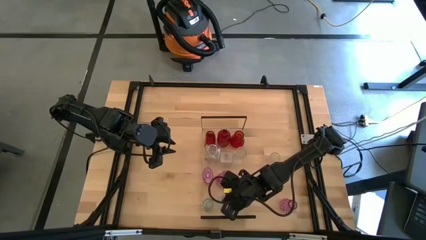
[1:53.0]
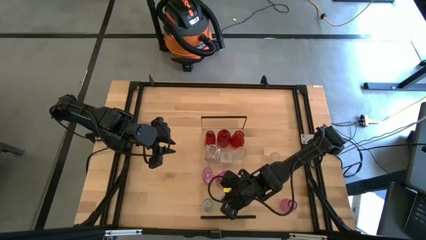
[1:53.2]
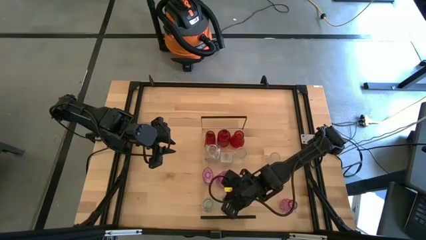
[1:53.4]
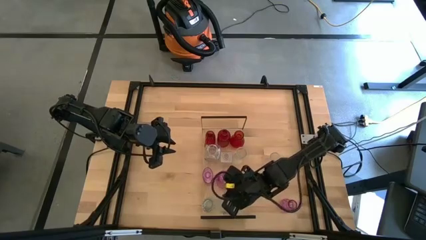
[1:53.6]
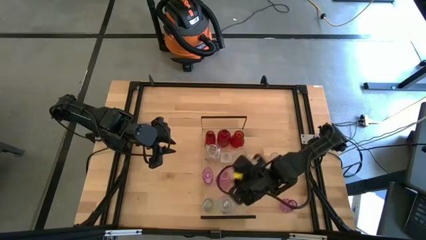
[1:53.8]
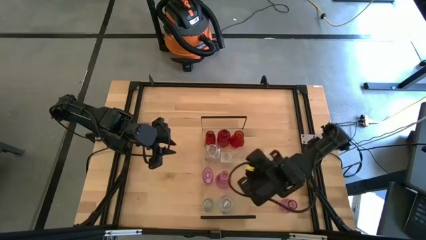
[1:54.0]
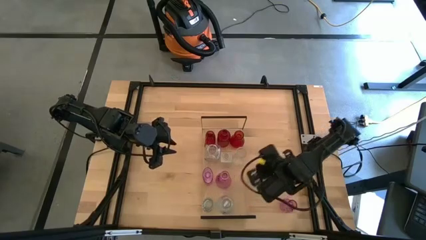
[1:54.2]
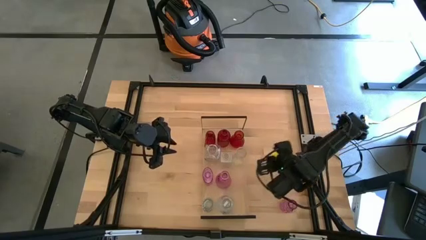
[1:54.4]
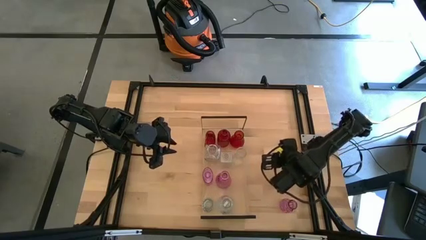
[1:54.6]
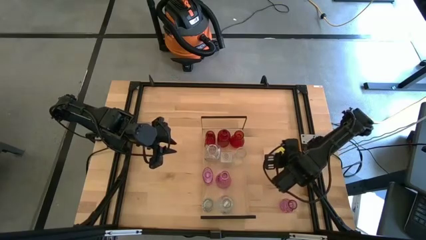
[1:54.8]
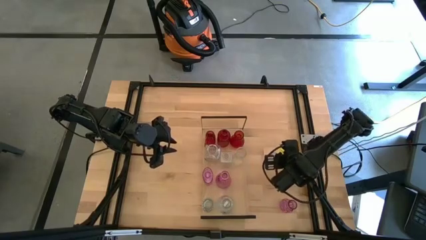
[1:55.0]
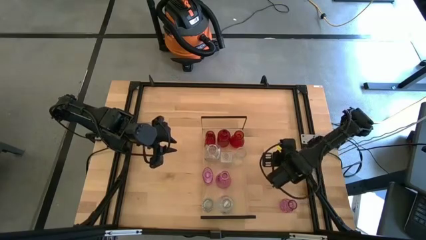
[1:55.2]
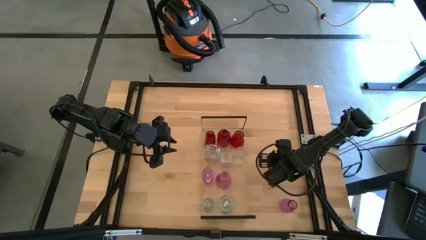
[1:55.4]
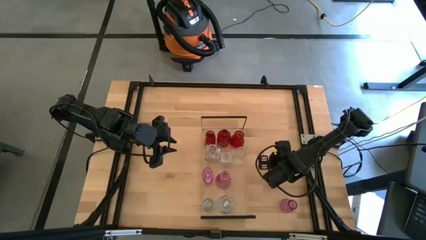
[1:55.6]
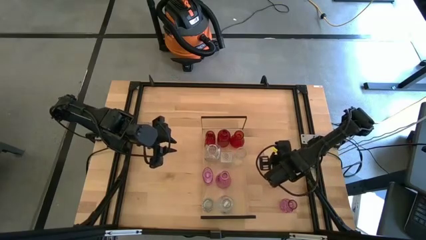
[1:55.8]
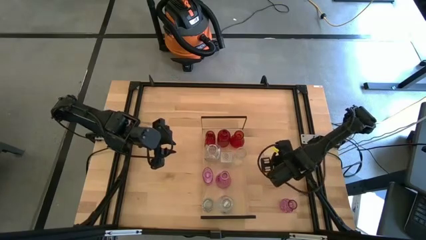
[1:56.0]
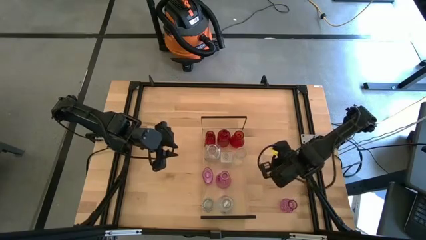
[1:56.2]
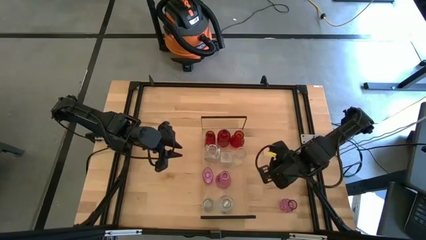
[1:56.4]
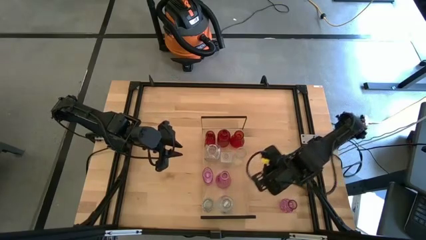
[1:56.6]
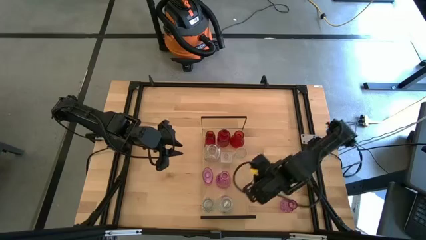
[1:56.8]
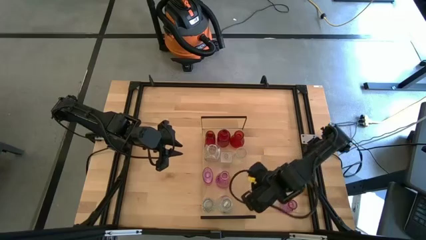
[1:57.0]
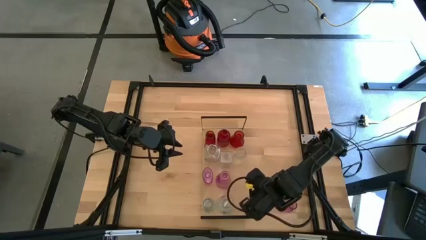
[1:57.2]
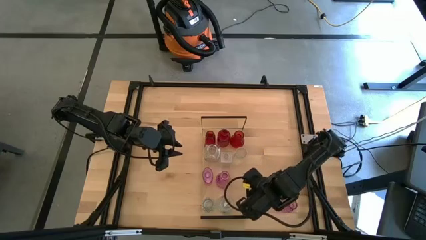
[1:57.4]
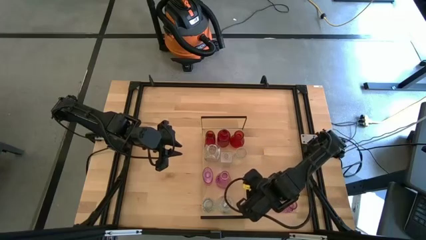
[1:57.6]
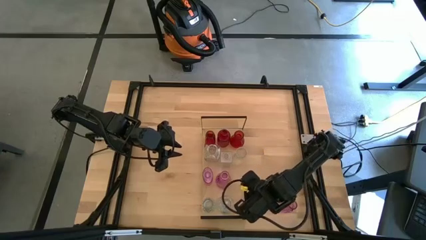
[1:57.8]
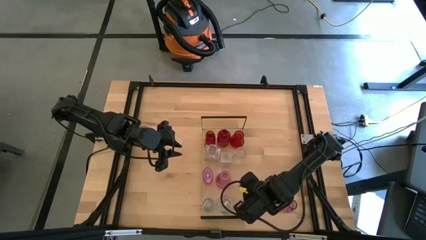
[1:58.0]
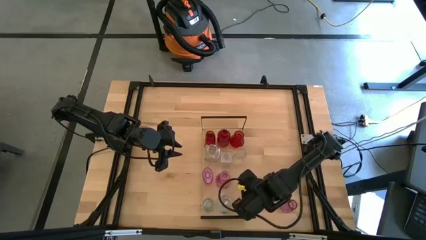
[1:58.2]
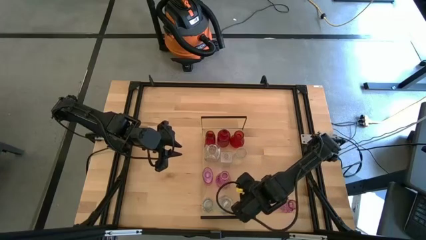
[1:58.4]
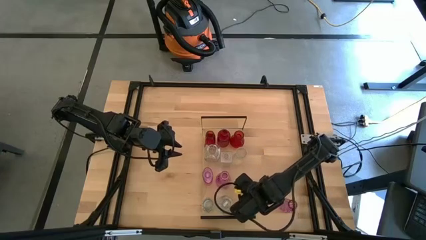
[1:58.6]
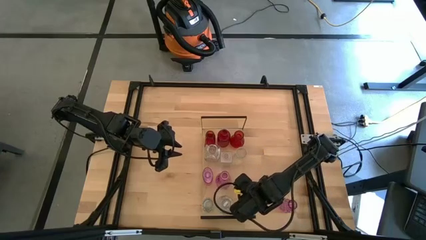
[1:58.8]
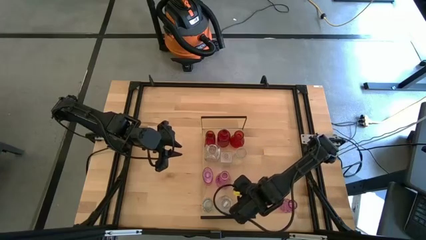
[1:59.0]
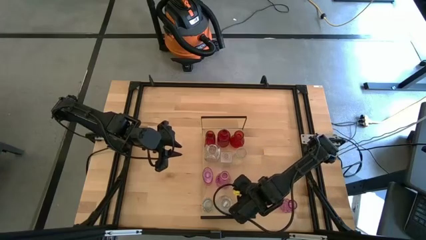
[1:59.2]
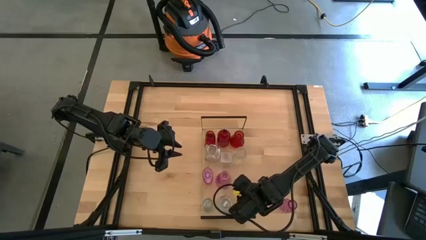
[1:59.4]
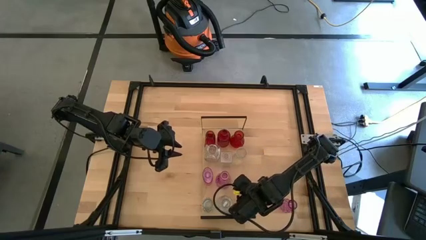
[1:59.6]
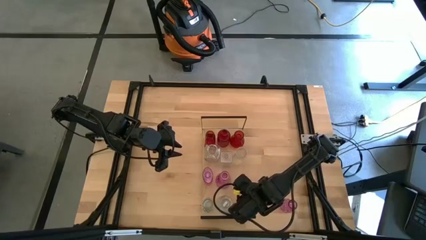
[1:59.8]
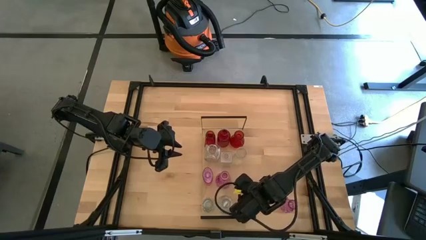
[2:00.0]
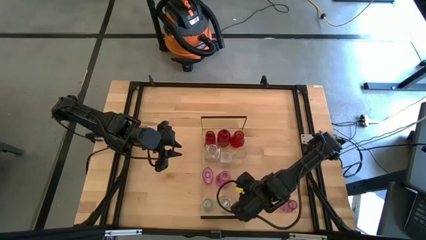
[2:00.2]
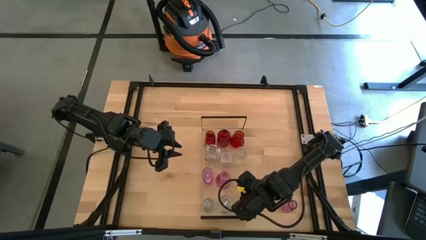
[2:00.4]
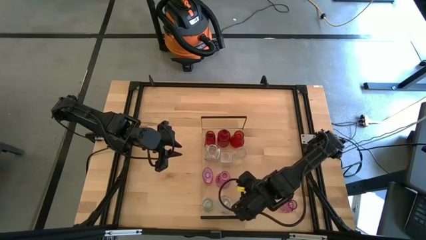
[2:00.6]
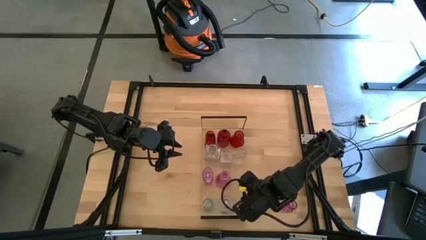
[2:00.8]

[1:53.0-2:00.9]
Task: sort vases onto shelf
Put the transparent vase on the shelf aligned with the other transparent vases

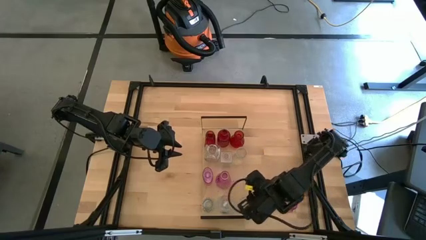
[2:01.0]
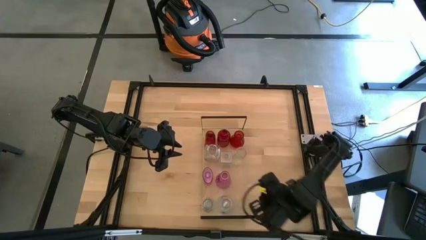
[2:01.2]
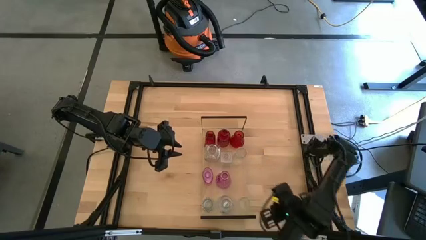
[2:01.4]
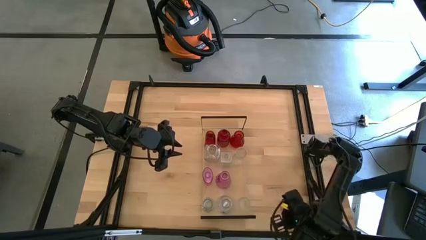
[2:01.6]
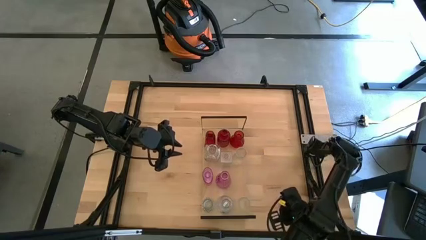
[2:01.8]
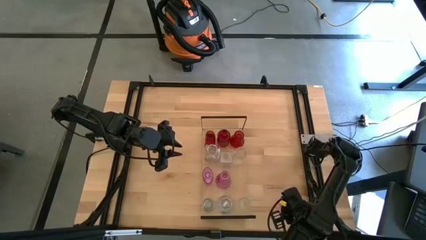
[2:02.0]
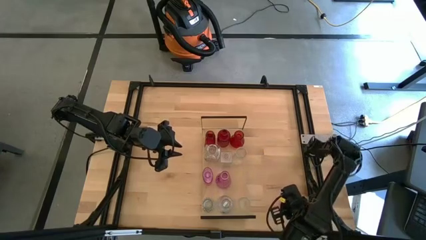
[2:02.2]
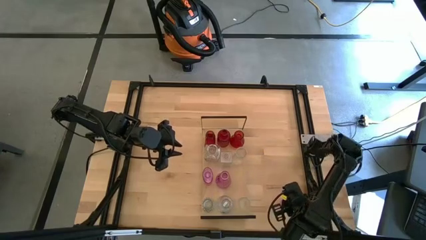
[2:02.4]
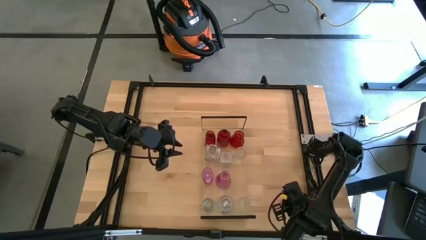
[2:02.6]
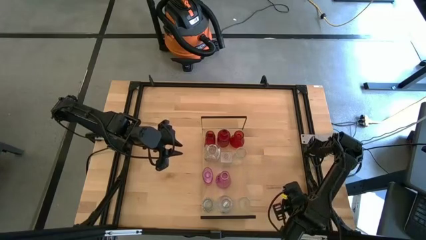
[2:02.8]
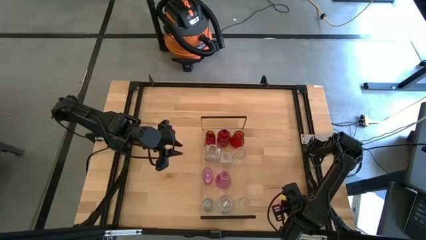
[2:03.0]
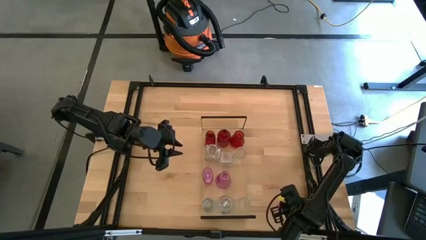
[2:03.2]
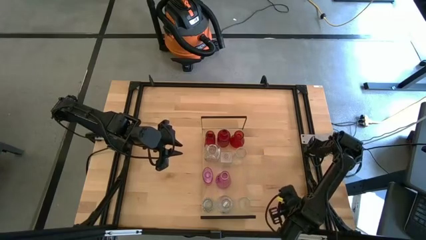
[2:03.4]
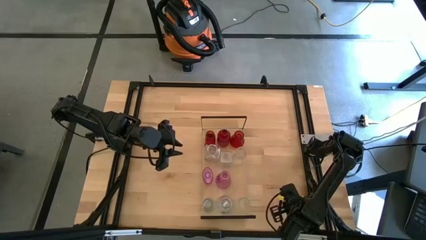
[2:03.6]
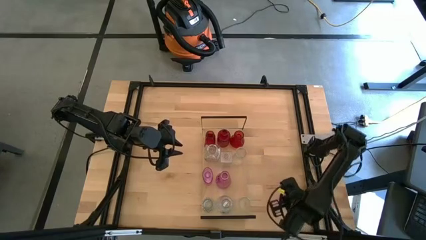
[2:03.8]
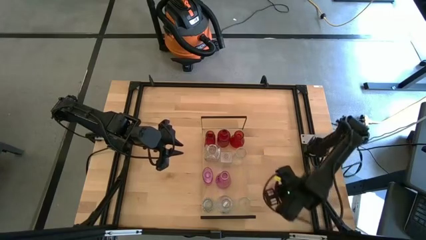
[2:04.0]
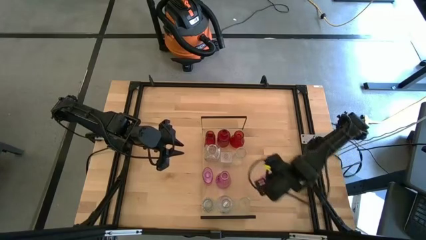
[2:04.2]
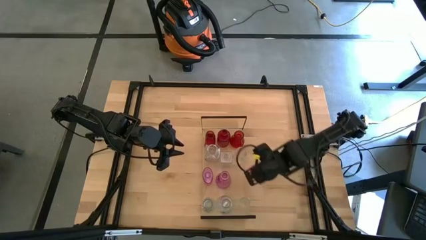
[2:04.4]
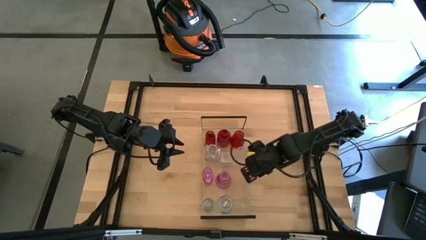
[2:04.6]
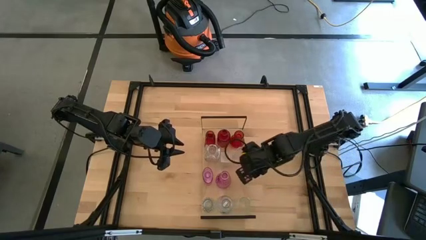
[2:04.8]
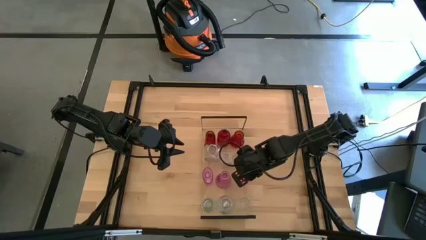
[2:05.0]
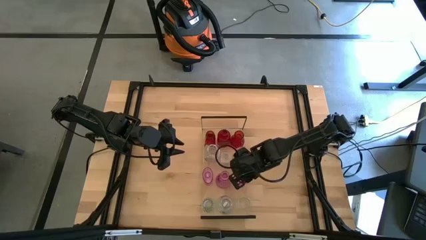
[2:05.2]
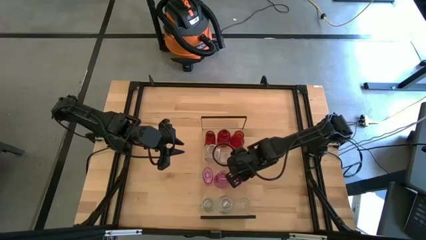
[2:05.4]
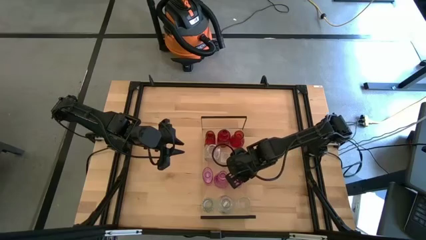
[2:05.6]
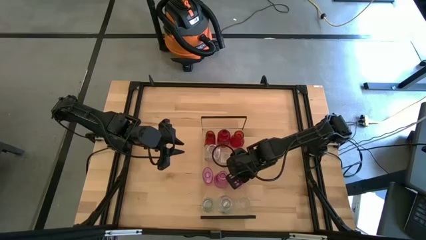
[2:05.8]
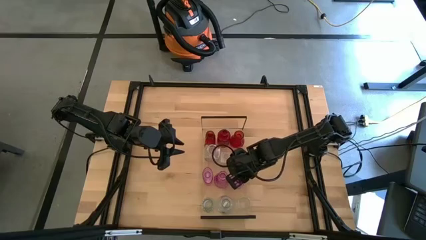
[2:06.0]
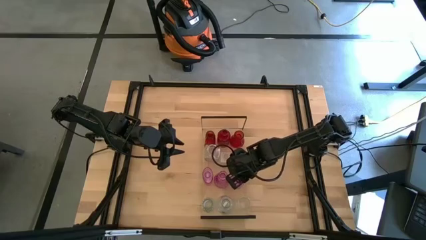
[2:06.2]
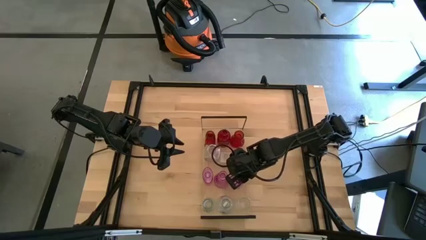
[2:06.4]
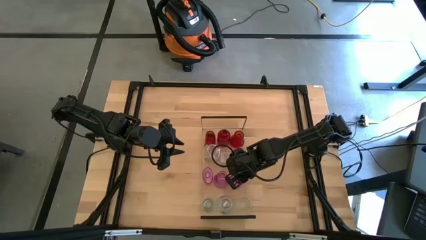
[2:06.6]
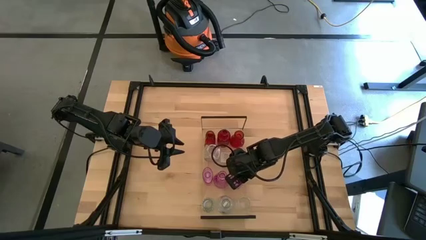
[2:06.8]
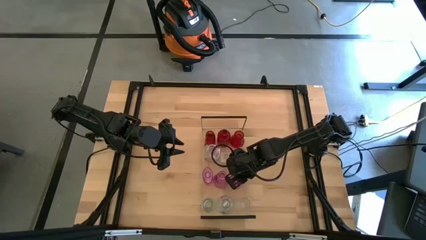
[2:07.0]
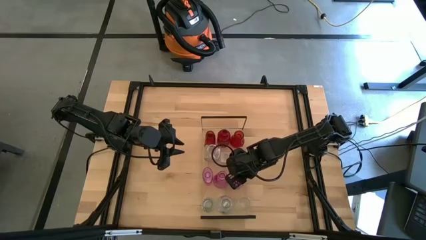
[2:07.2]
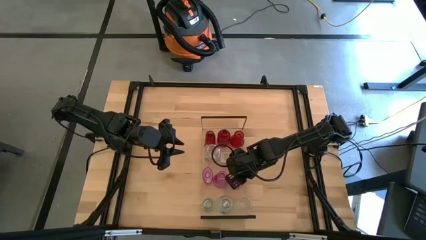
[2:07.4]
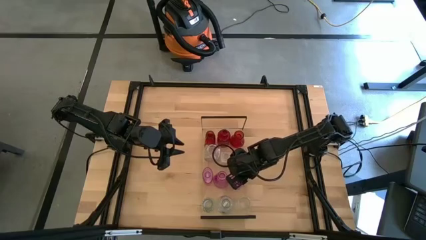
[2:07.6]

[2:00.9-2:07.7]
Put the light violet vase on the shelf aligned with the other light violet vases

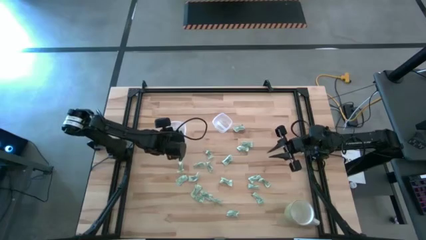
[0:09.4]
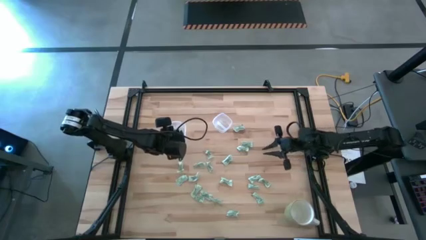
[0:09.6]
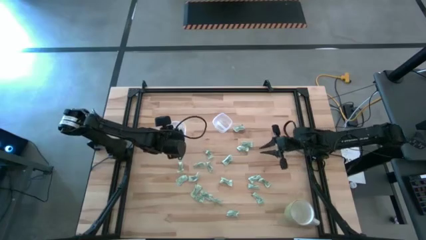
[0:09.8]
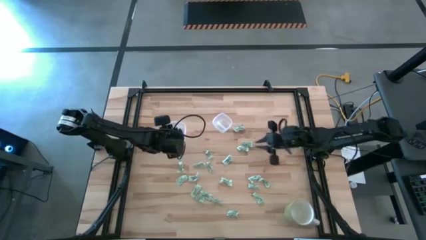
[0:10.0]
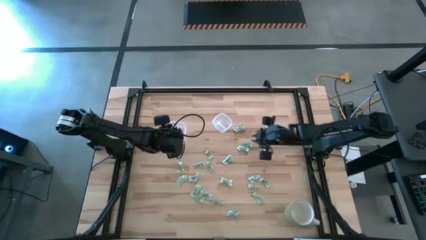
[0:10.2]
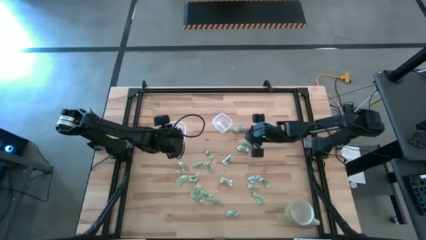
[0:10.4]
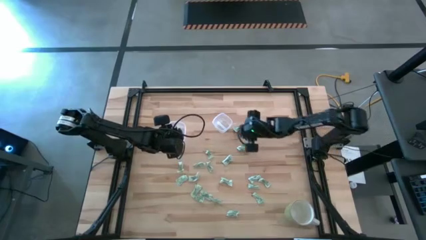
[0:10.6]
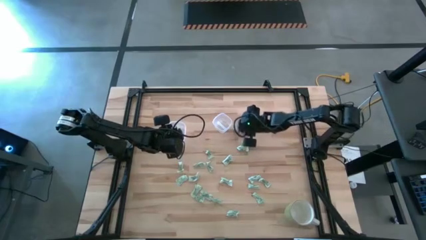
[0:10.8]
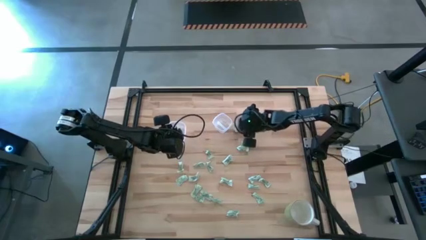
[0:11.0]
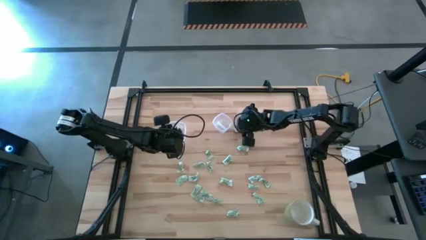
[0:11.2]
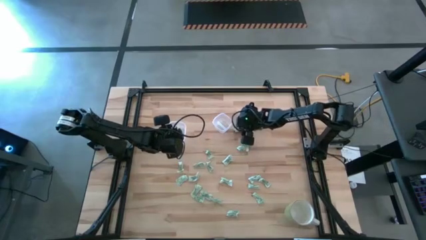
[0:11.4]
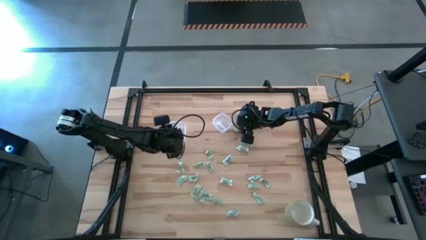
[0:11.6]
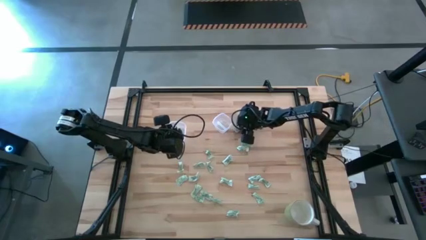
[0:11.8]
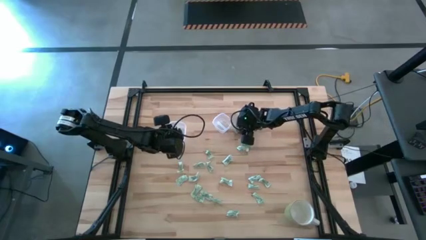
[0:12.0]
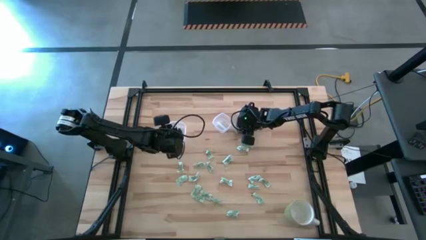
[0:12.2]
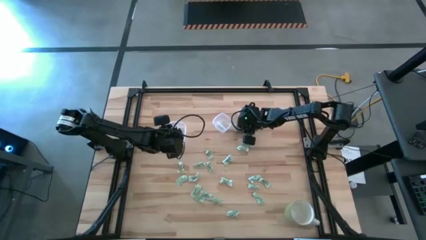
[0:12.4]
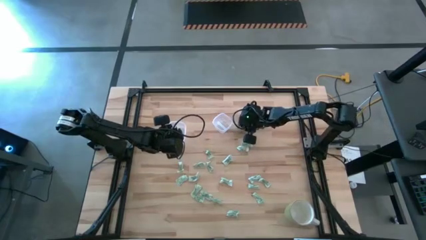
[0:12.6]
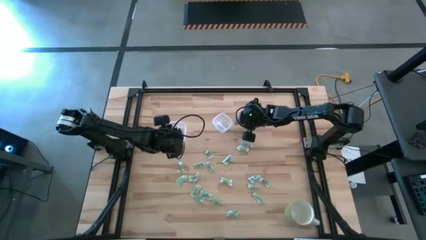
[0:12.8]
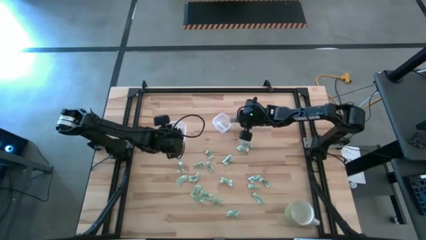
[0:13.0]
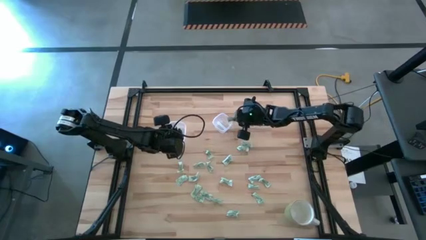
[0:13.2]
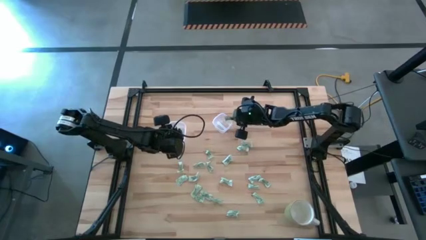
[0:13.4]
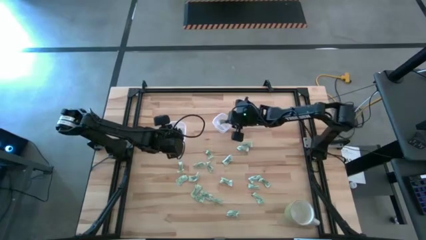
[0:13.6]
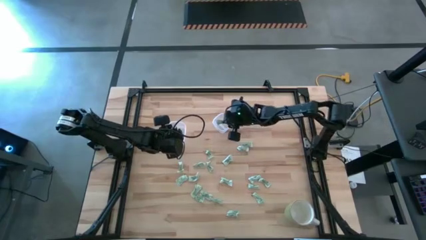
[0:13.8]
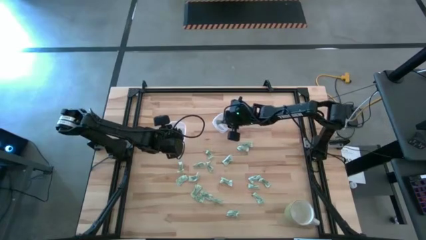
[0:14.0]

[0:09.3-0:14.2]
Task: Pick and place items into bin
Put the stevia packet into the small transparent container
